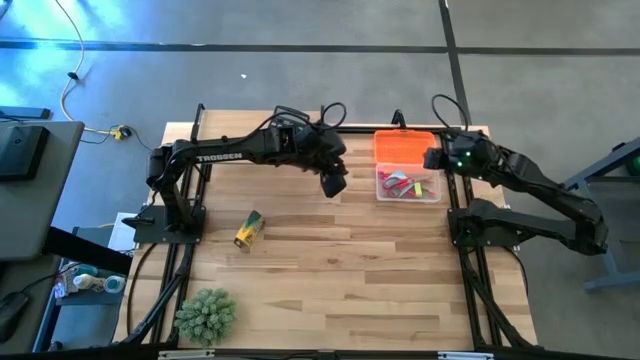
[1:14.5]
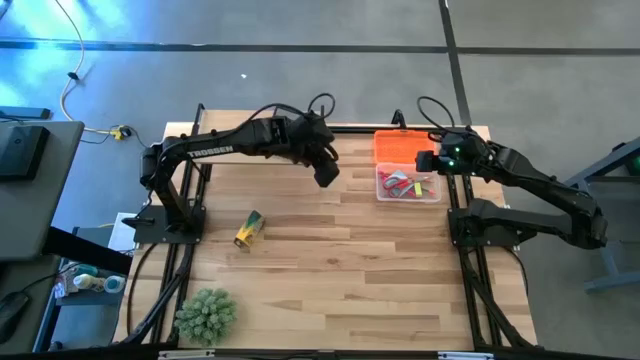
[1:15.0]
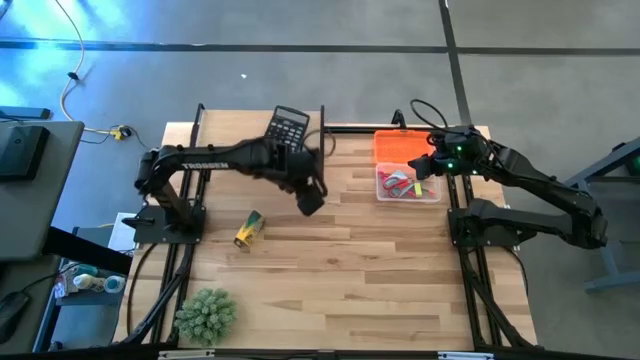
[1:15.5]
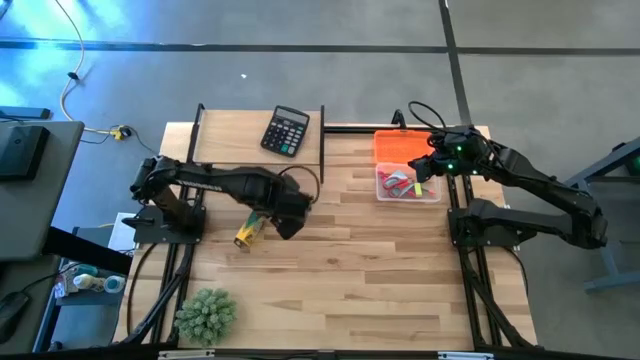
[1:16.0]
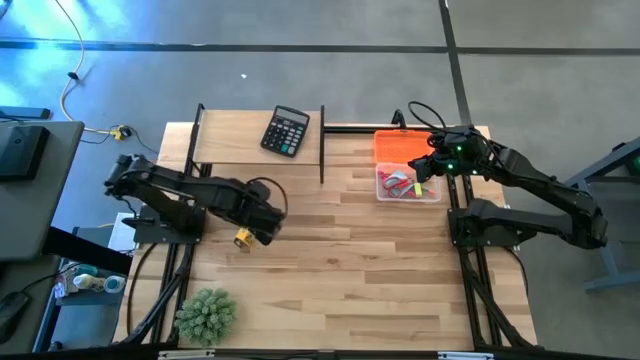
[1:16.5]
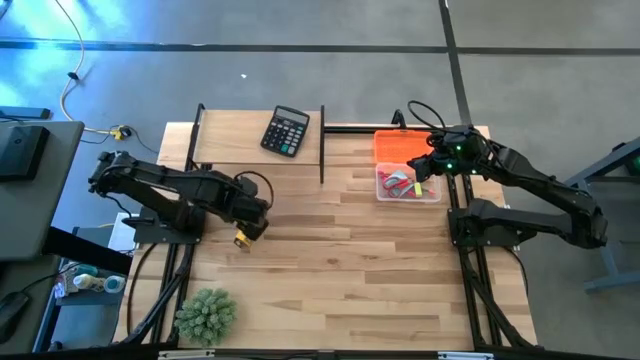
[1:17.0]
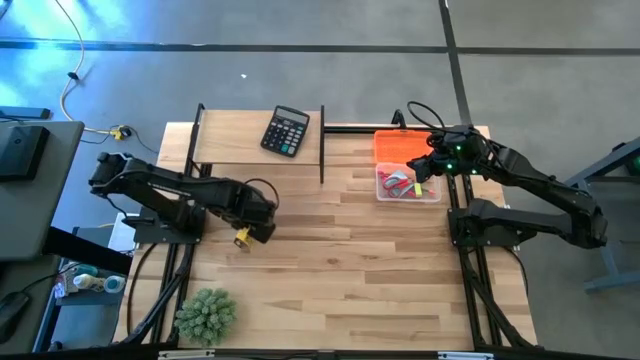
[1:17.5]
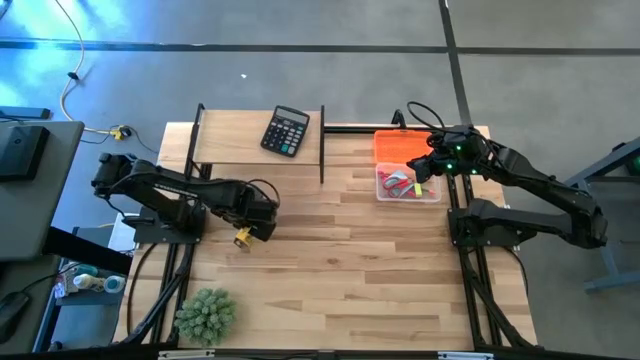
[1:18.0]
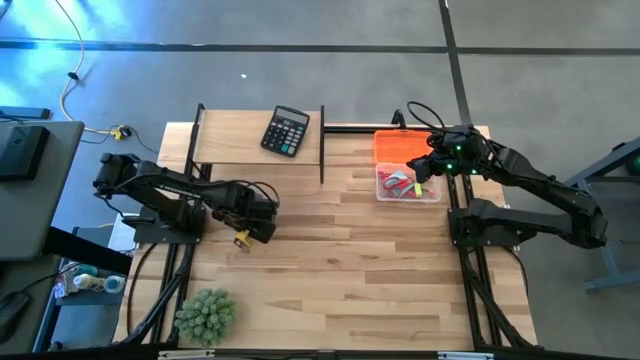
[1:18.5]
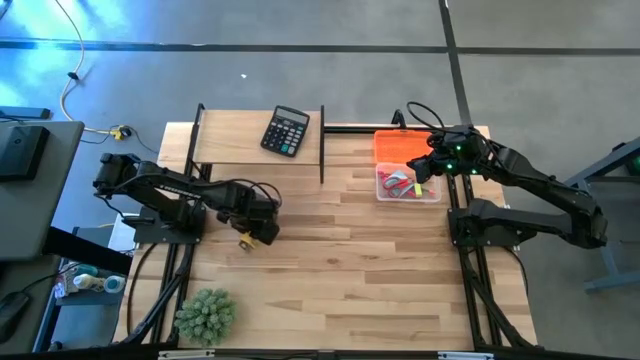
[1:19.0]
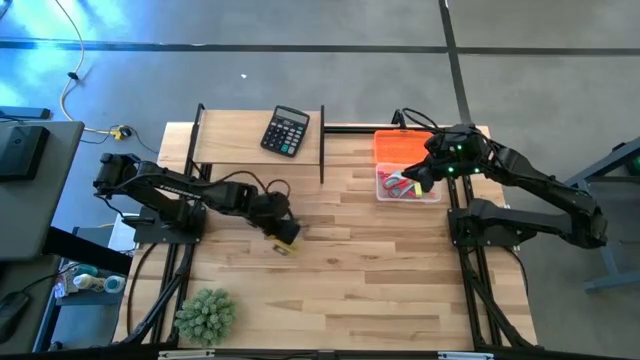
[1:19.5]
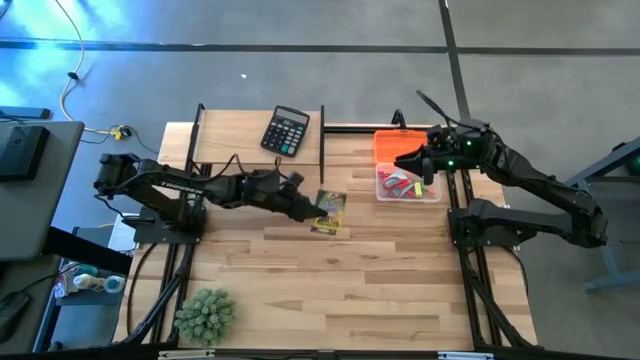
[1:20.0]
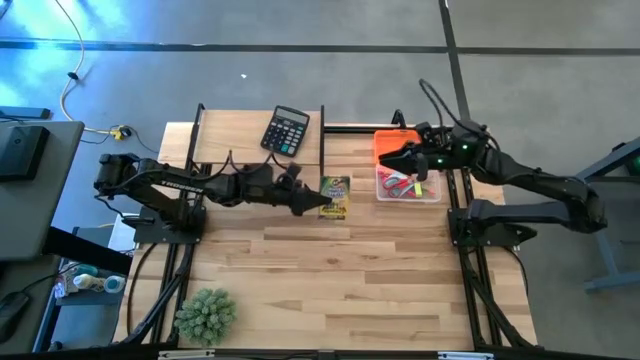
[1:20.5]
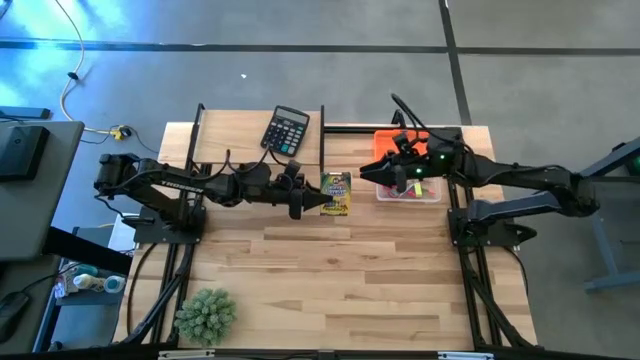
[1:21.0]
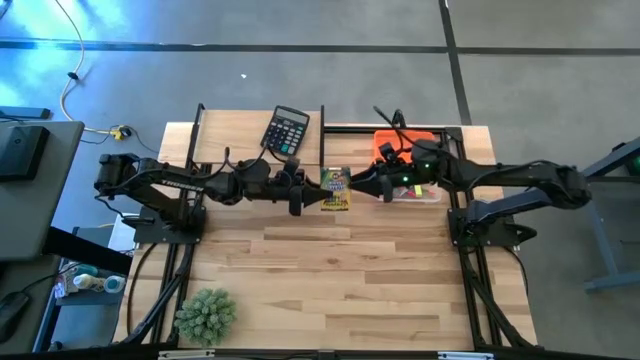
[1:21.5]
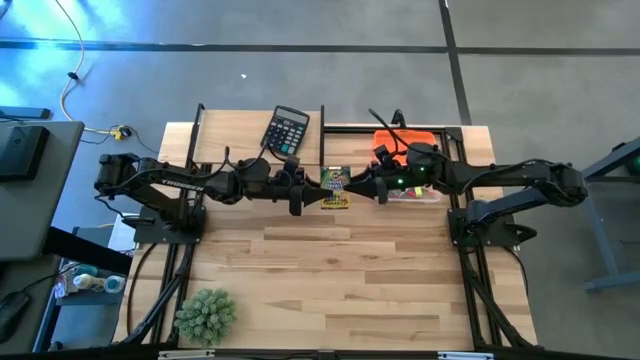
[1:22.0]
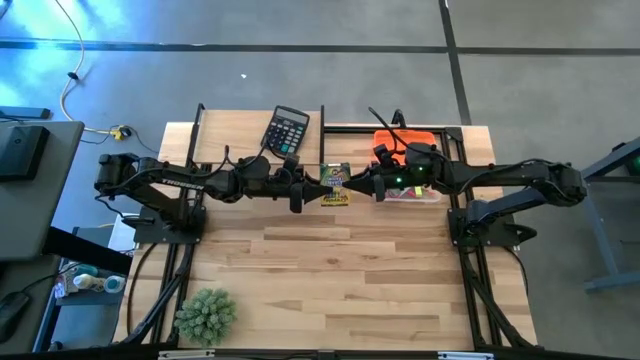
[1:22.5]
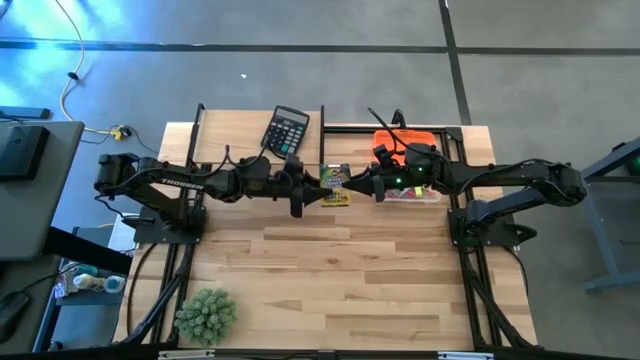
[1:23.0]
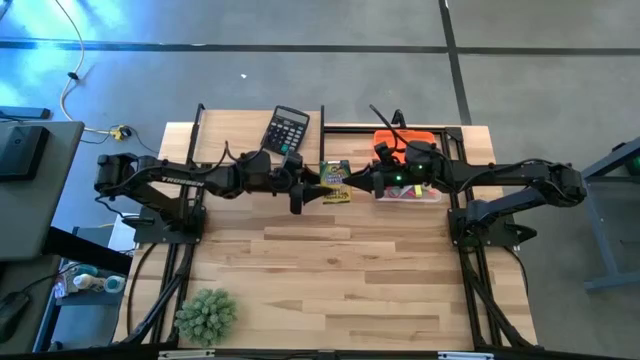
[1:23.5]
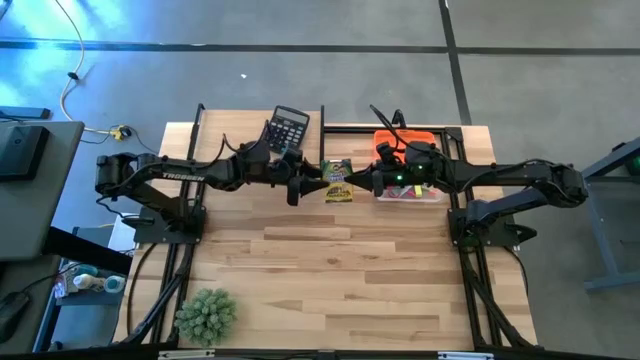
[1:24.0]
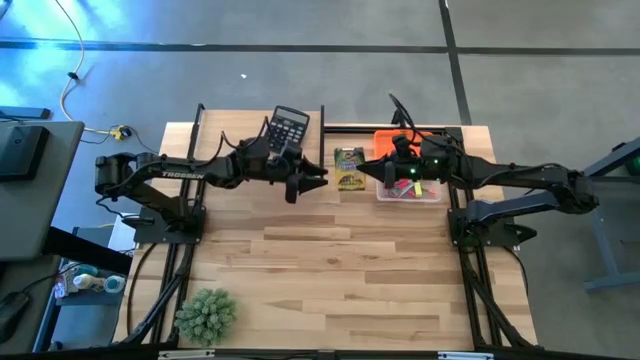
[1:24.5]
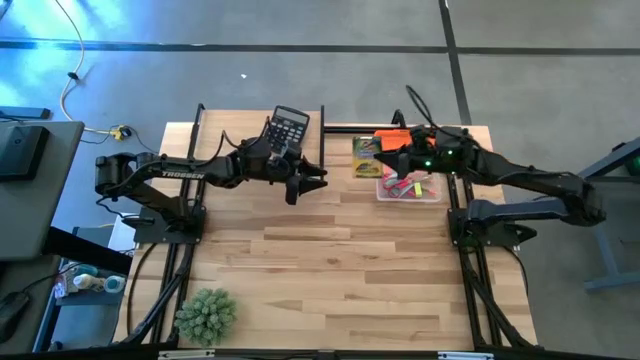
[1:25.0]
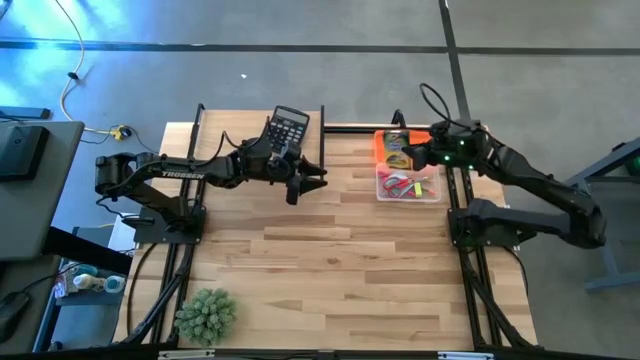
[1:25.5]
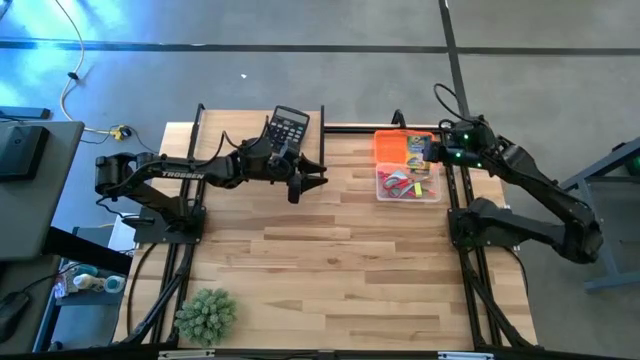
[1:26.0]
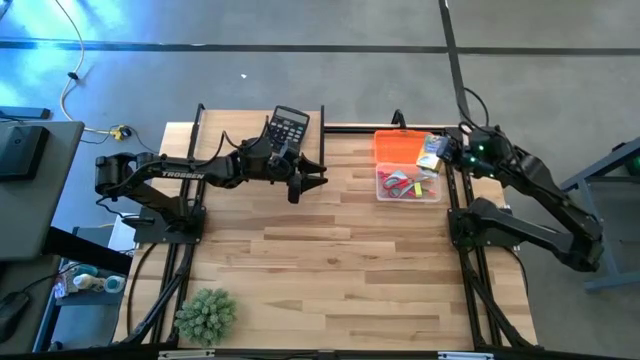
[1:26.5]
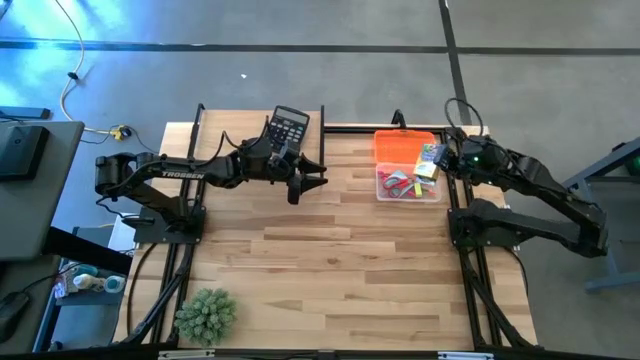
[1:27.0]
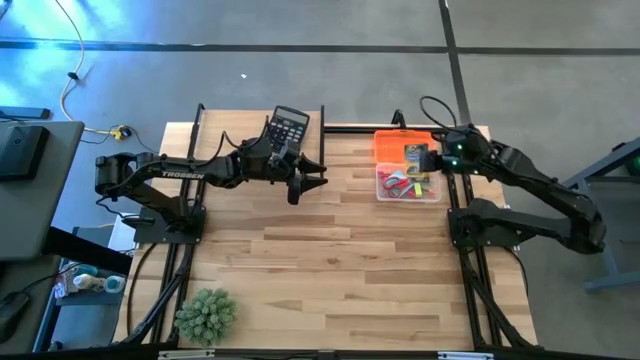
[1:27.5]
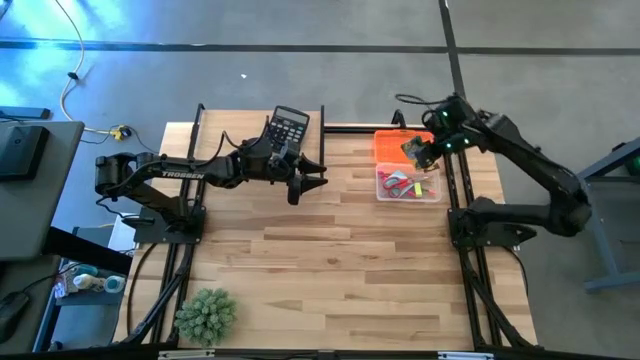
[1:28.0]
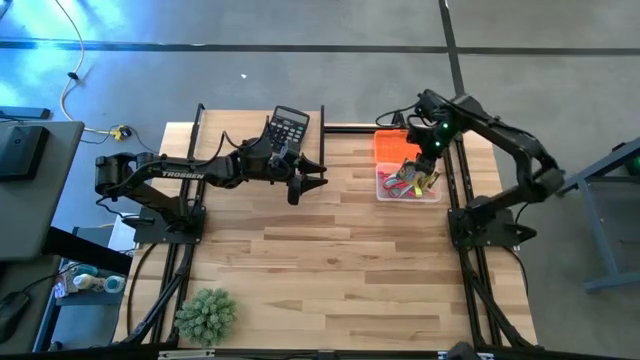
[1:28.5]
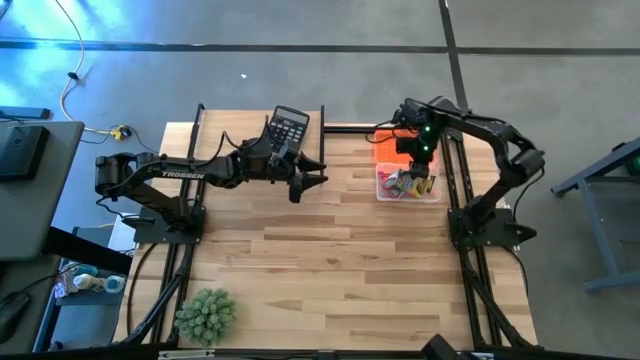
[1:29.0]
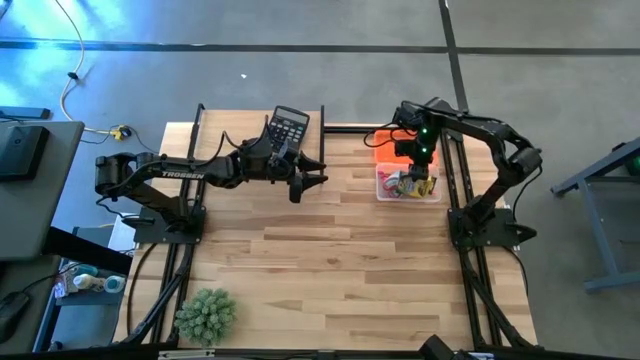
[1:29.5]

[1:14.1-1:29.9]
Task: Pack school essentials
Put the yellow crayon box into the orange supply box

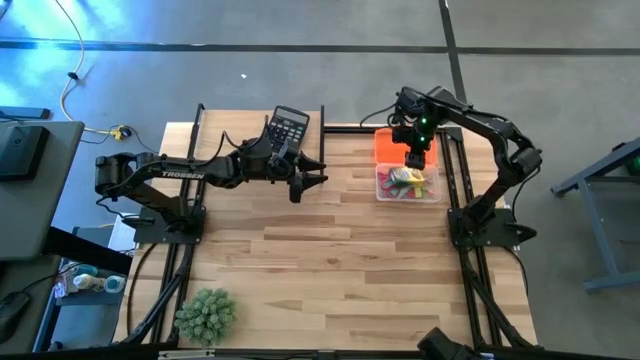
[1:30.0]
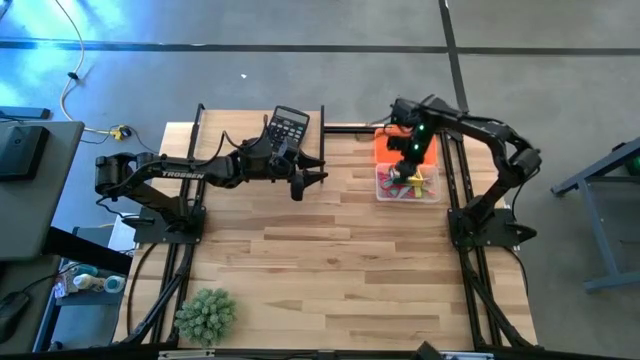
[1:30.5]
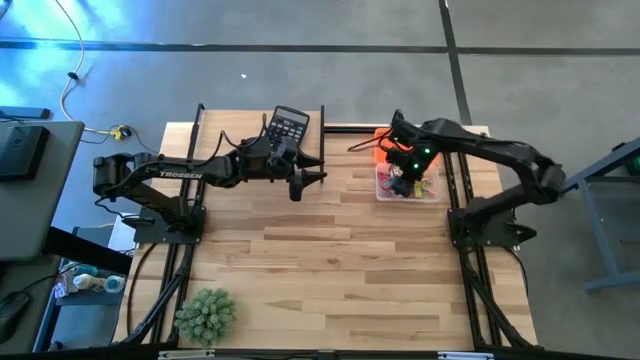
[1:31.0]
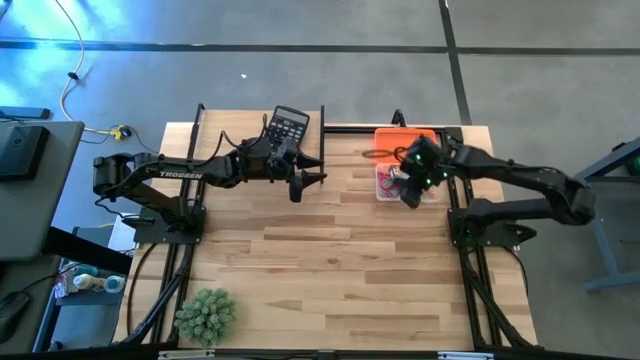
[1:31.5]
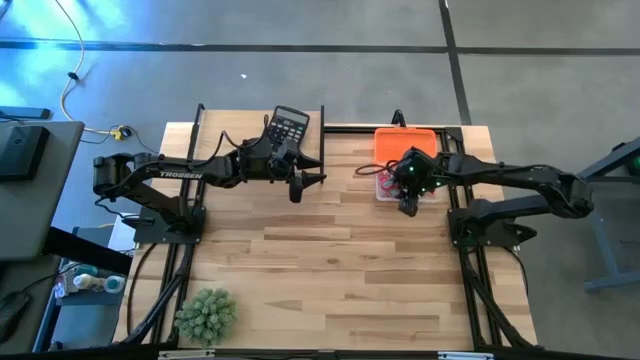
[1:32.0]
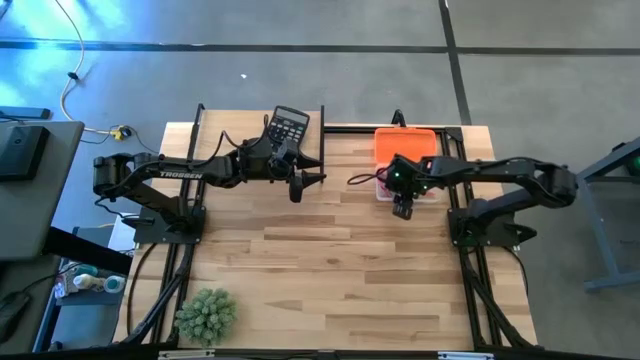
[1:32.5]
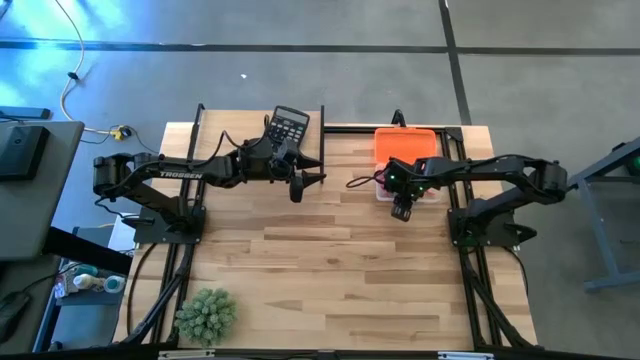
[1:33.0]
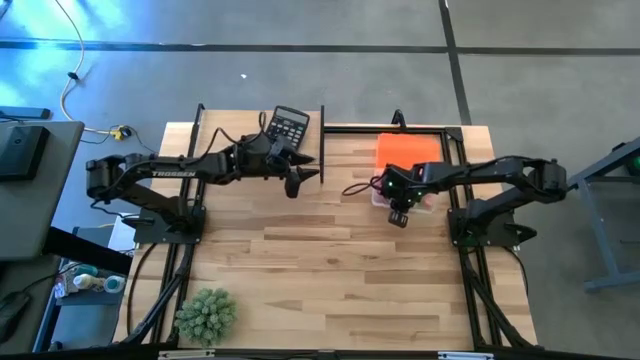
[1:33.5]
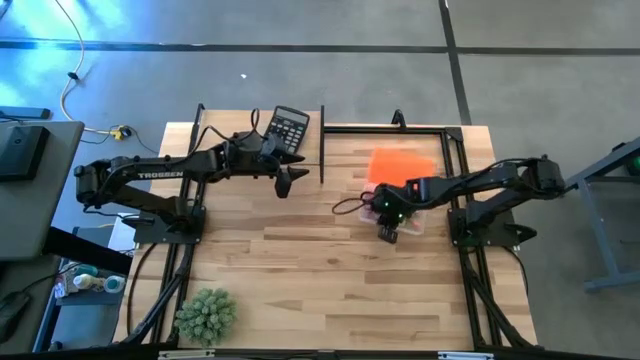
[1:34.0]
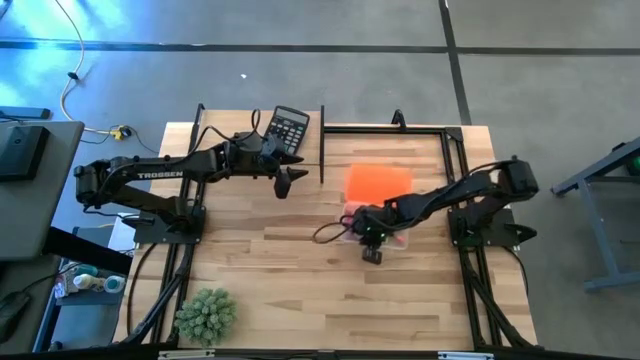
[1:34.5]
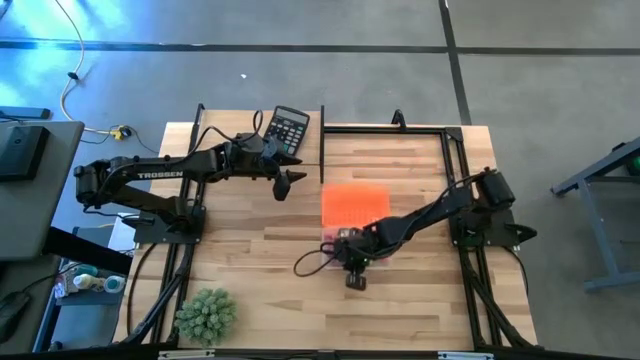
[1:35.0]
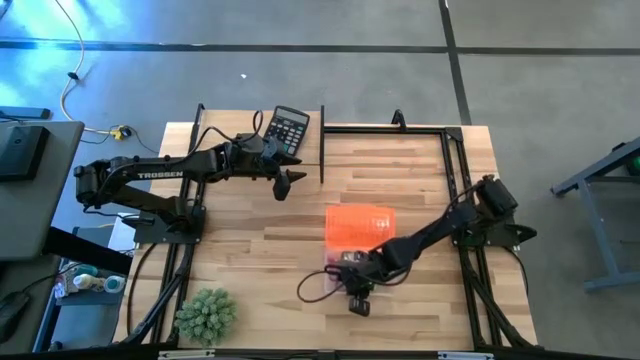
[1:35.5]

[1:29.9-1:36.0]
Move the orange supply box to the center of the table
